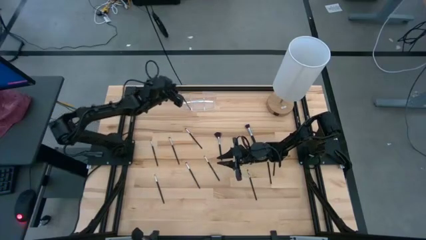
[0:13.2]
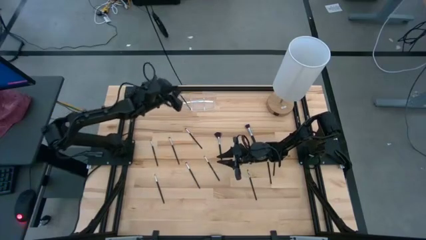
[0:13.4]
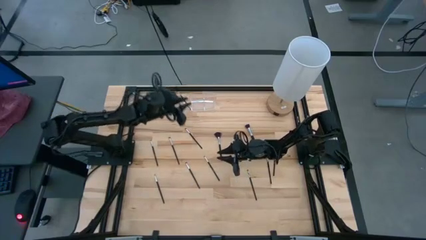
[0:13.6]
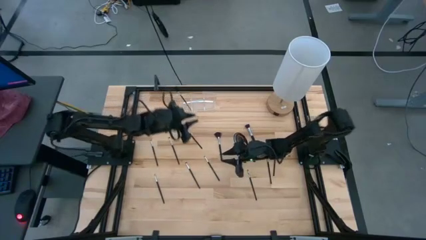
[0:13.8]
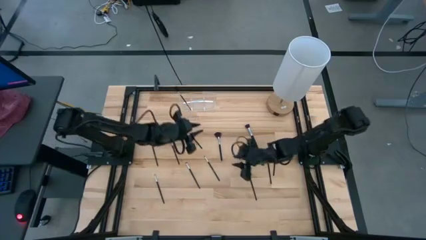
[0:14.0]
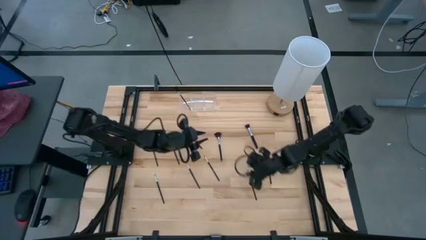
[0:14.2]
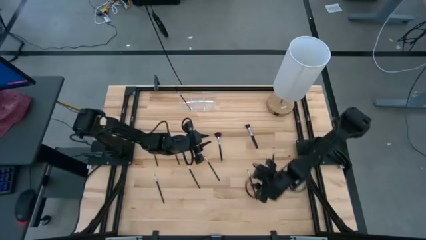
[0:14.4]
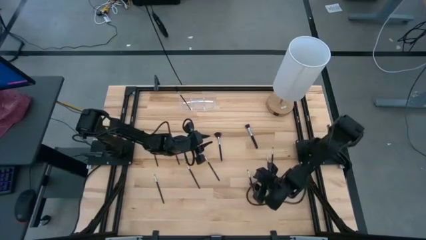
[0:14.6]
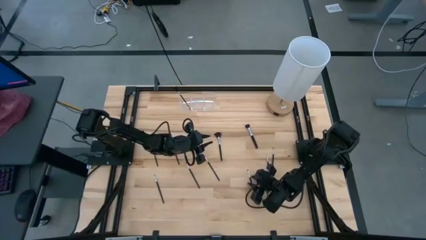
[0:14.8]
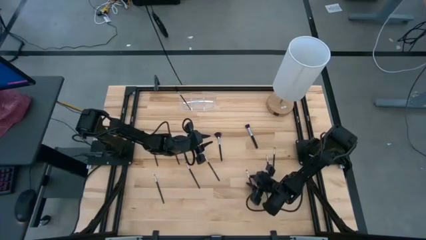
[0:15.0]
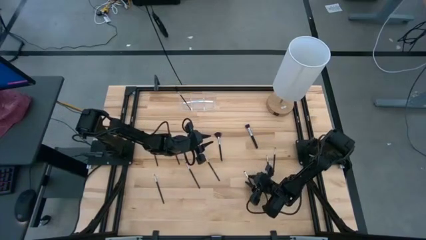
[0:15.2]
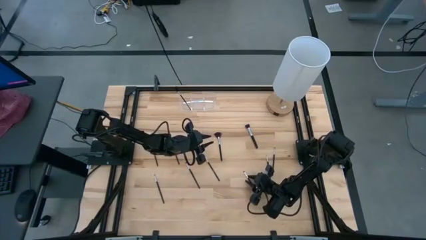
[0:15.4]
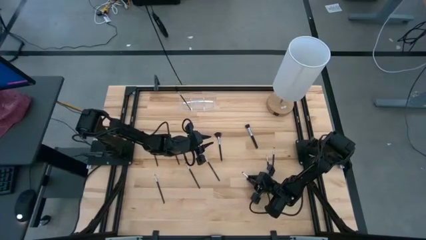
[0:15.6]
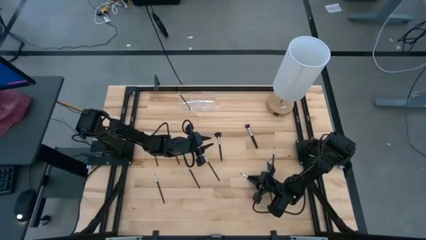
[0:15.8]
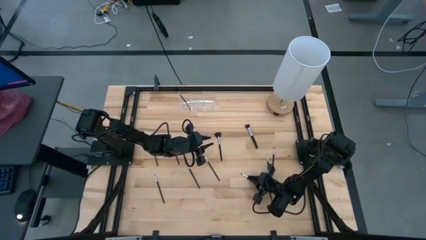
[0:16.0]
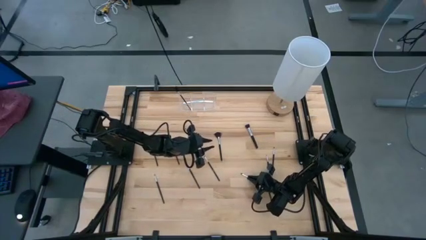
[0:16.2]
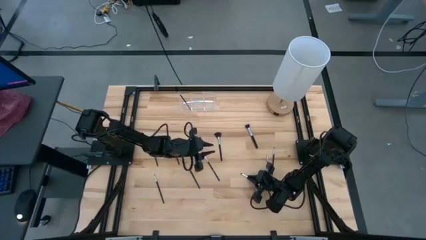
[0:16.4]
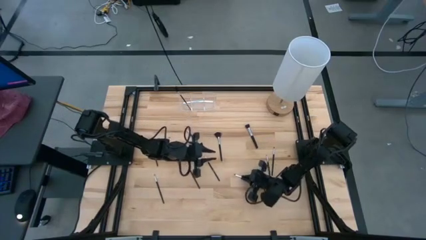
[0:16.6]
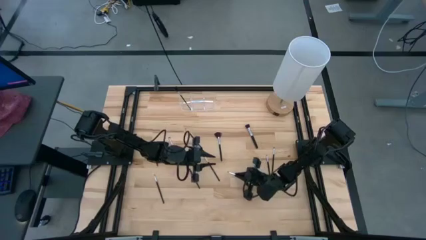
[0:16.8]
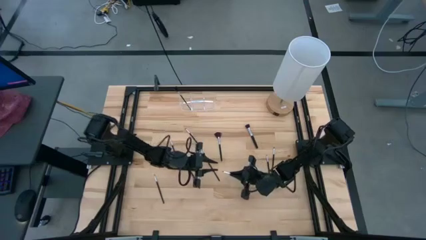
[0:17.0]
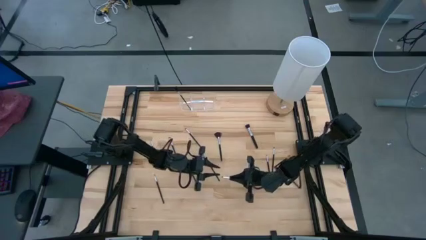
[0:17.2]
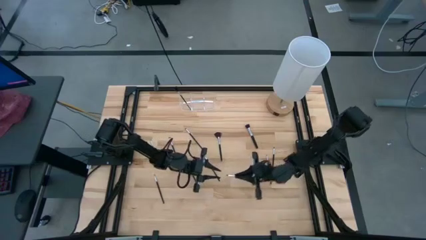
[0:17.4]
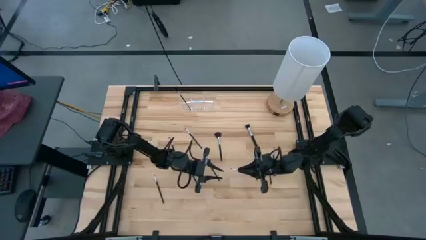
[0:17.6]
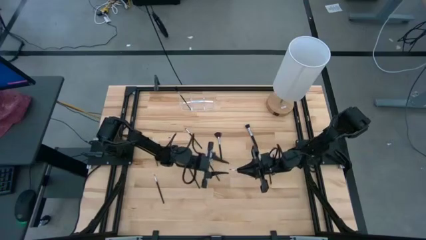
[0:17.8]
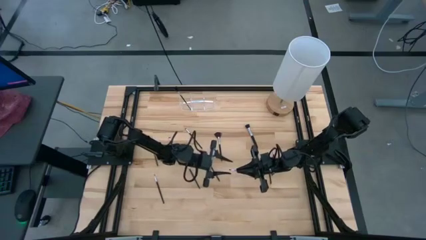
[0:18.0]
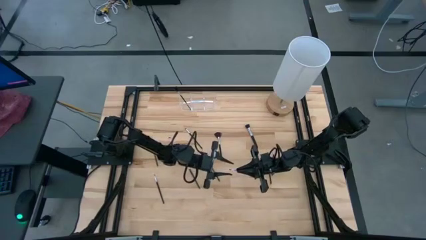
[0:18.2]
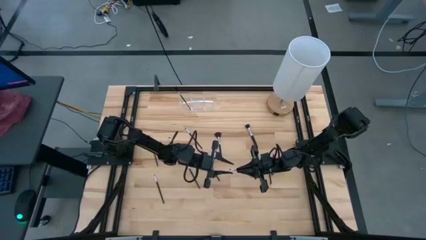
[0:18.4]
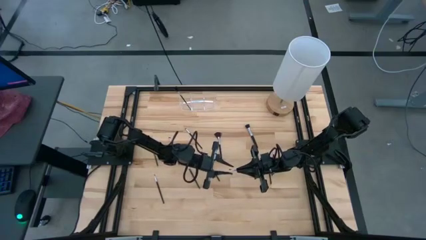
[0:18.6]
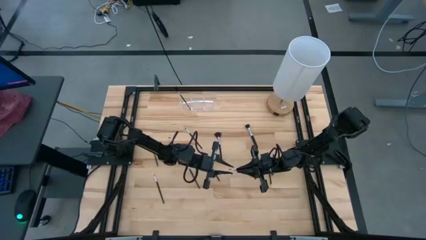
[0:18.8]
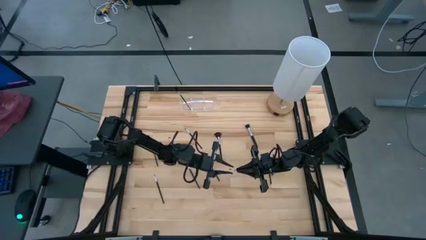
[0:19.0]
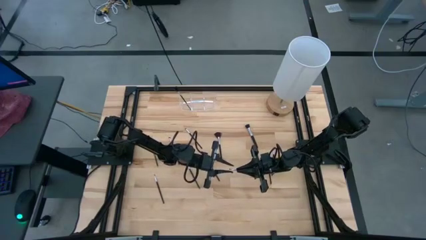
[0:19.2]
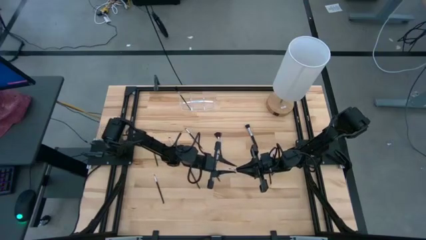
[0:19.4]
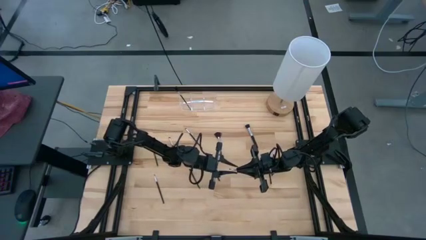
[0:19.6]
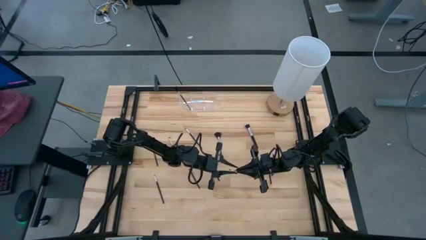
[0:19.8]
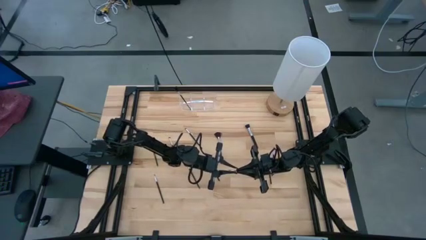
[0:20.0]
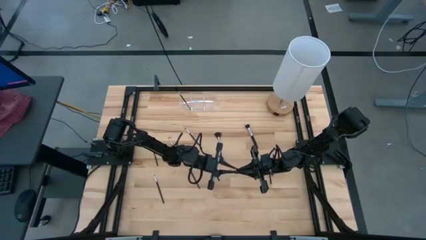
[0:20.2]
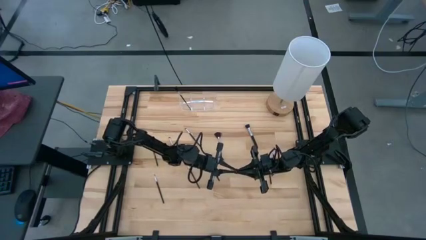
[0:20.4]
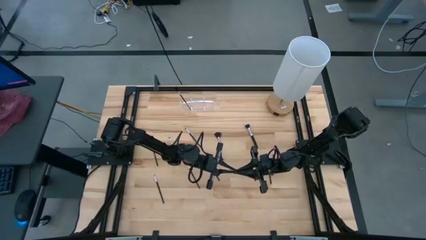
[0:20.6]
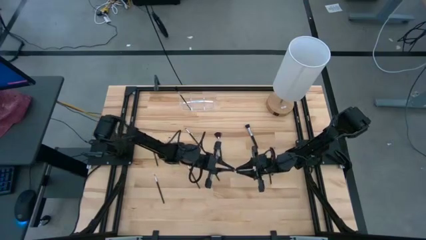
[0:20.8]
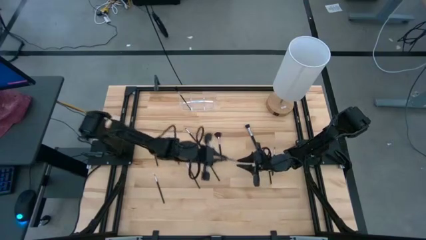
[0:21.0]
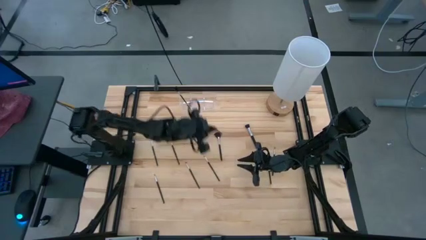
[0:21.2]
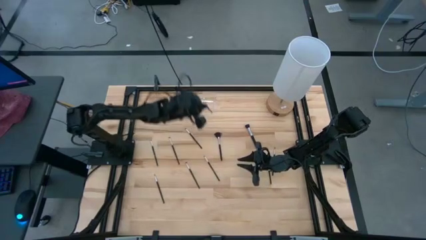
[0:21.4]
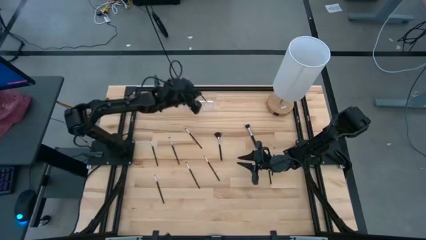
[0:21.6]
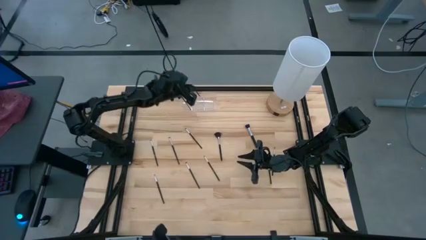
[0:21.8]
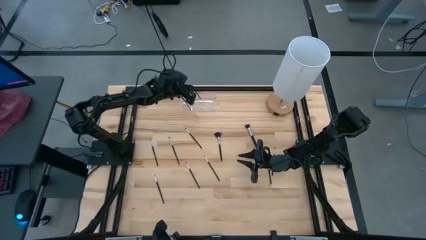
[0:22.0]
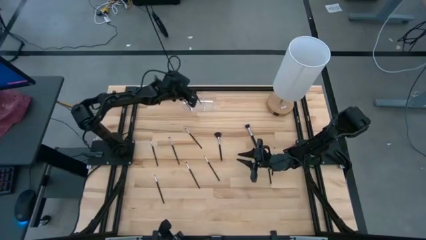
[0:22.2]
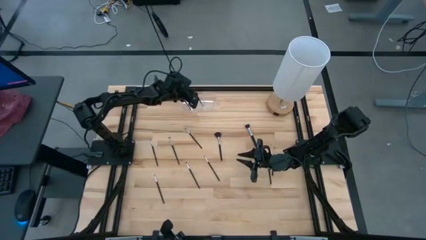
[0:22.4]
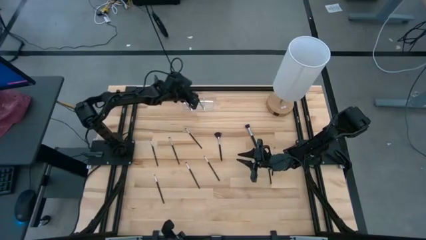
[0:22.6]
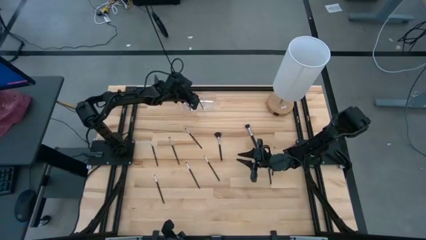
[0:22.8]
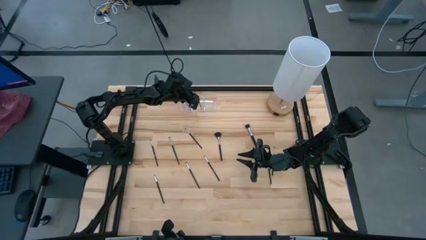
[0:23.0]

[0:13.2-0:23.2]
Task: Put items in baskets/containers
Put the black eyeshadow brush into the transparent organizer

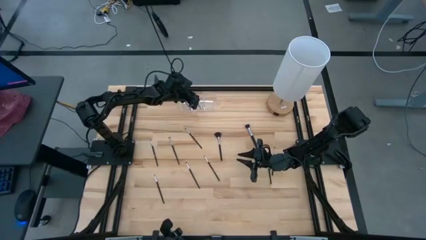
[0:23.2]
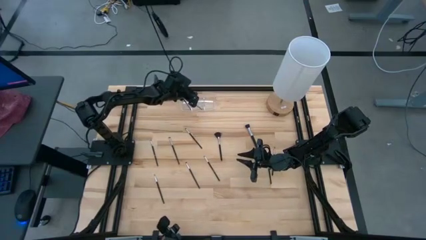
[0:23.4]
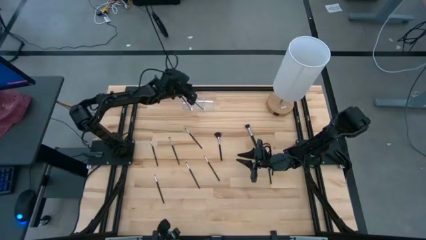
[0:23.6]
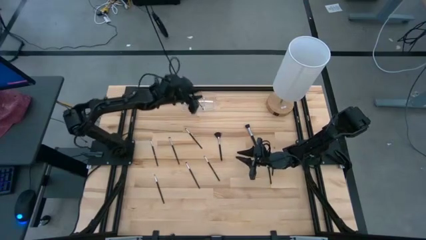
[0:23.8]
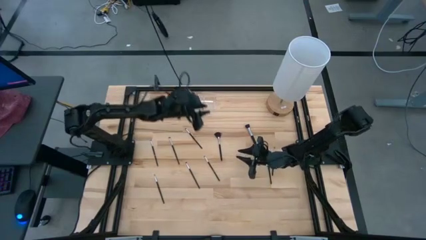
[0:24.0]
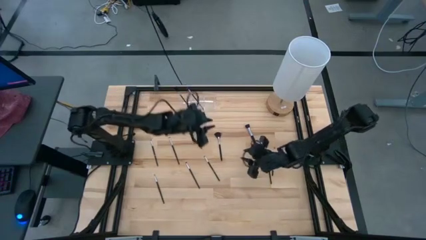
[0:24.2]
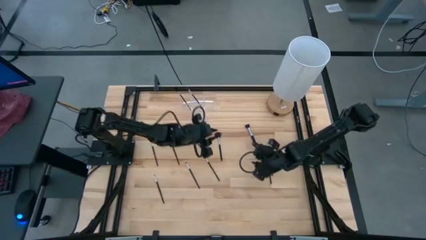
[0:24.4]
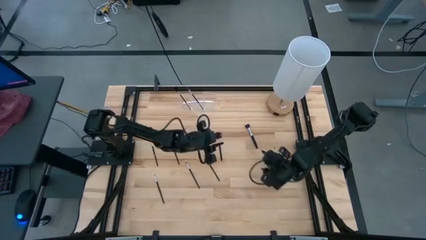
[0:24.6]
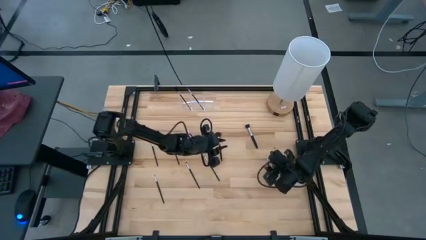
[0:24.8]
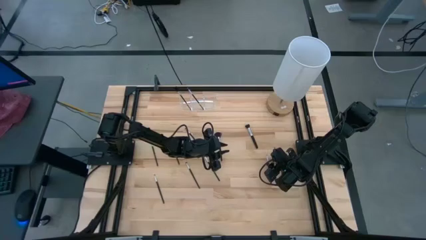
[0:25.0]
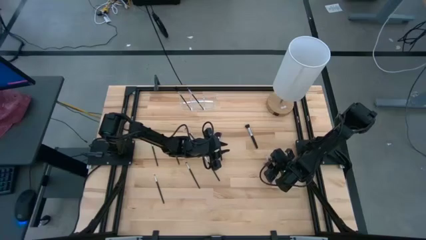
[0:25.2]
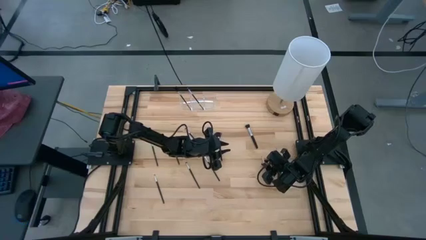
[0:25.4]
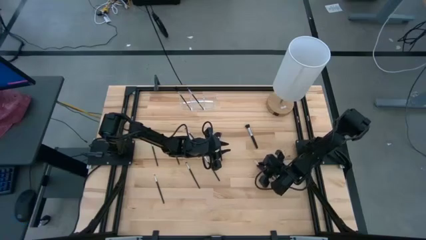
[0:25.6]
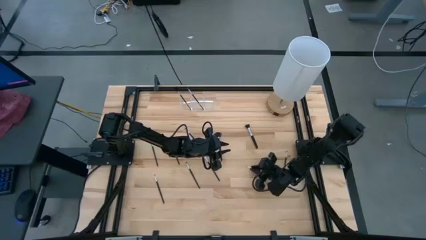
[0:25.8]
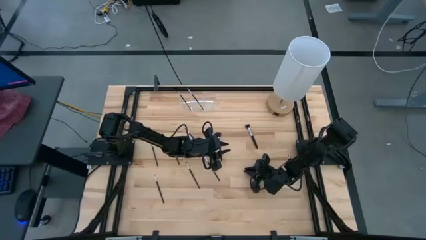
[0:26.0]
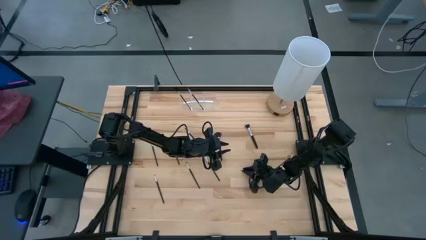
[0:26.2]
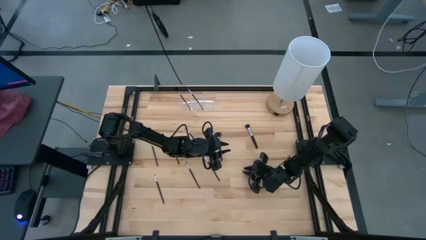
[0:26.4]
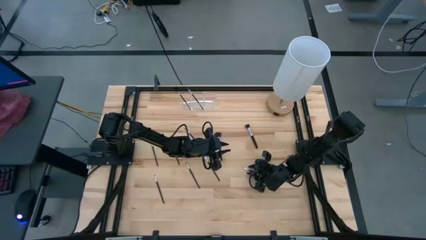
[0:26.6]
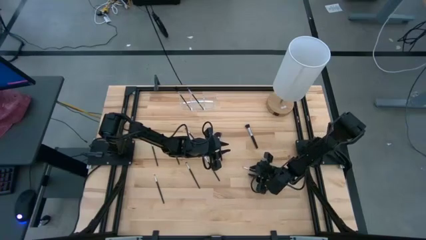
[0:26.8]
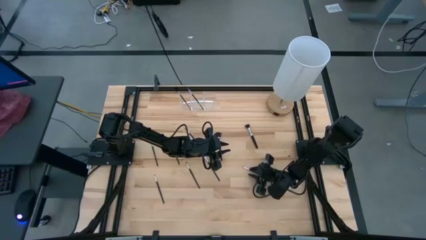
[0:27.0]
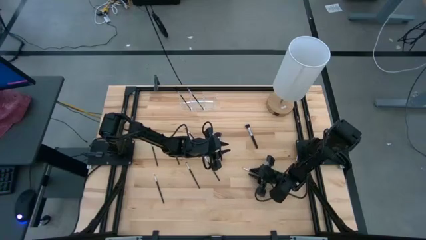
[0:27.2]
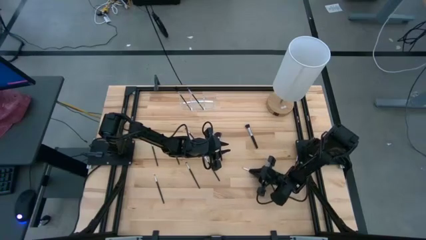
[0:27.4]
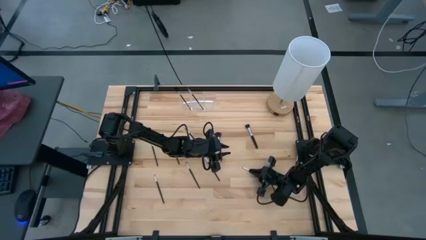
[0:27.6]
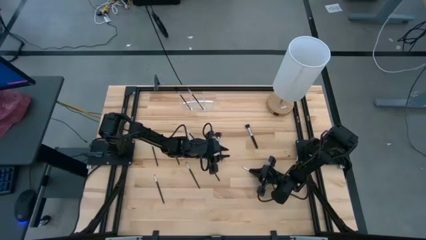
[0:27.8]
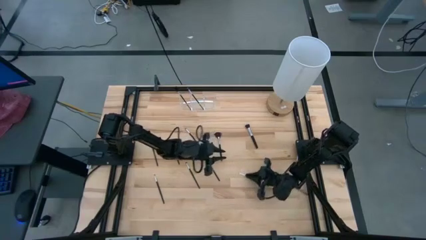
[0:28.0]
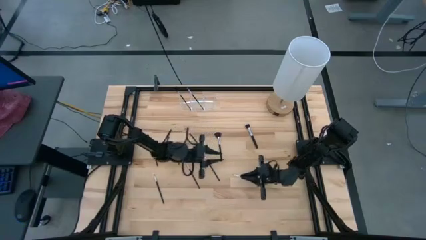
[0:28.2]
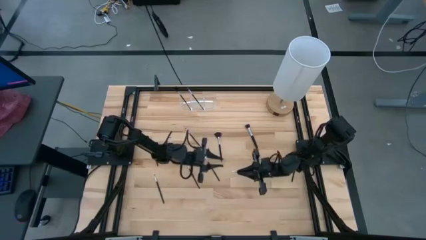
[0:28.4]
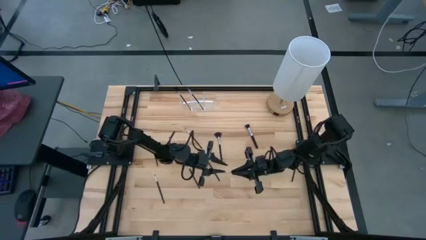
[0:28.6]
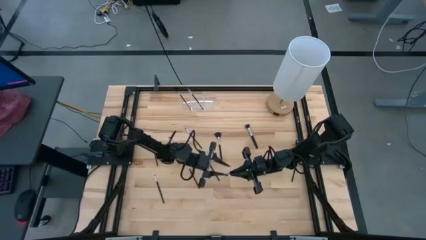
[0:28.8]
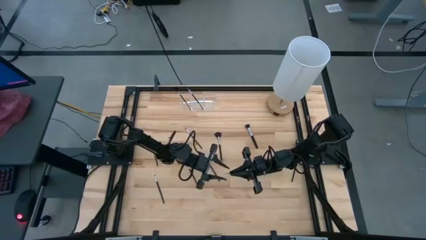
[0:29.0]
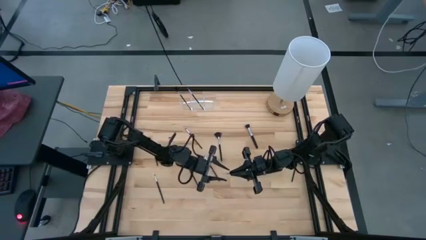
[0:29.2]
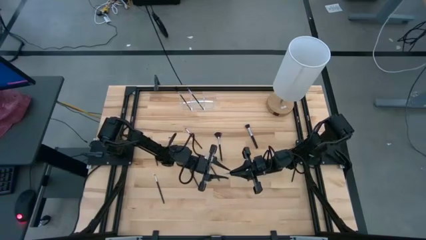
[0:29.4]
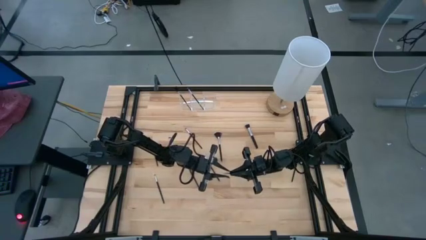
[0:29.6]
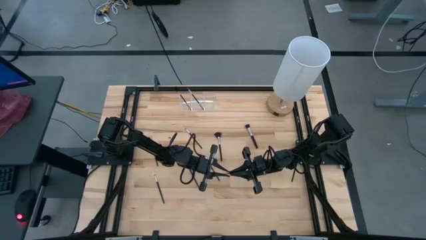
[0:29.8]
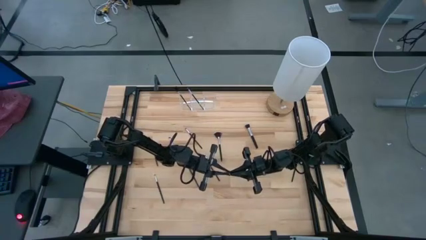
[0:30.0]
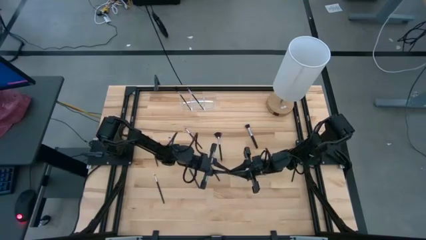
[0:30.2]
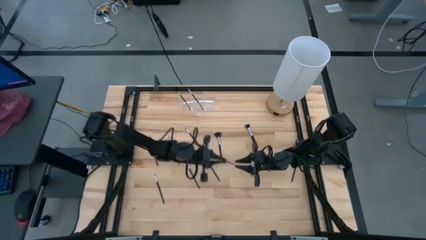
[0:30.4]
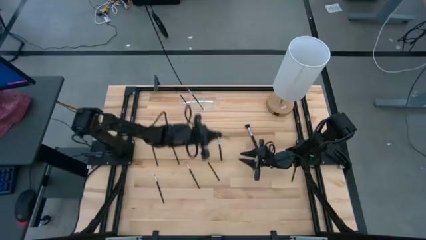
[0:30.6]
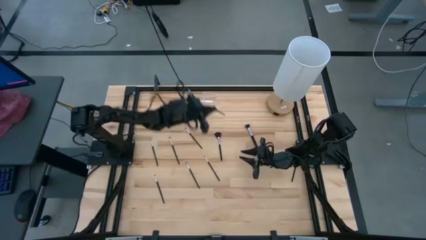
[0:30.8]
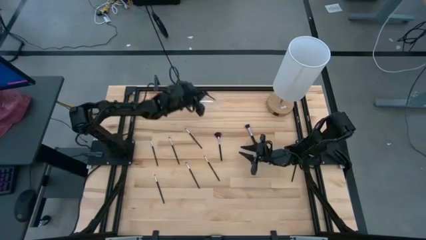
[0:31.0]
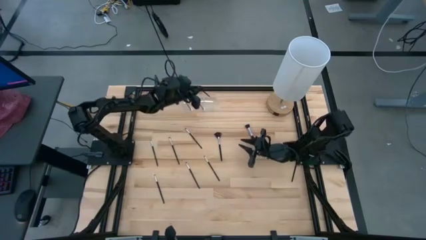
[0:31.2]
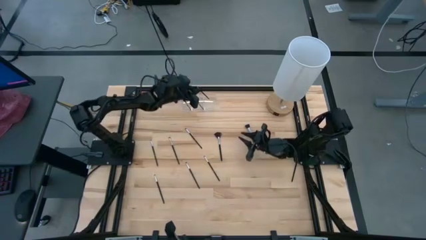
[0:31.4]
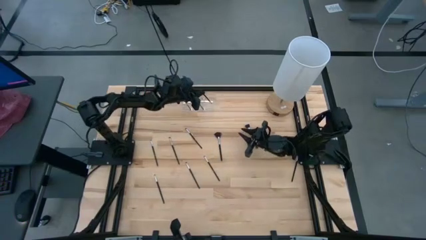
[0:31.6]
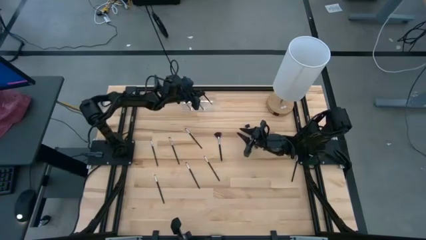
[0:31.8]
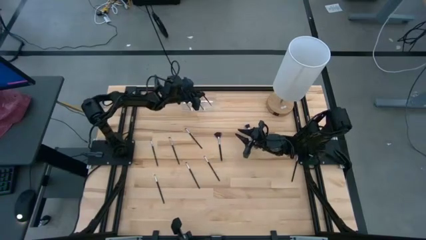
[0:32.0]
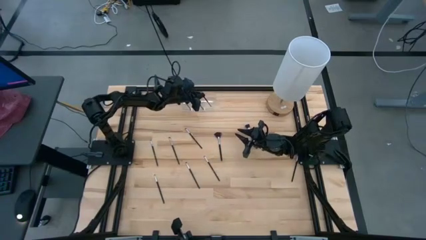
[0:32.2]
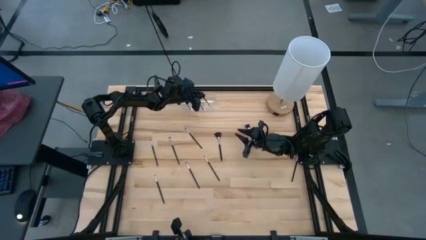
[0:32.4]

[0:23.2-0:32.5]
Put the black liner brush into the transparent organizer
